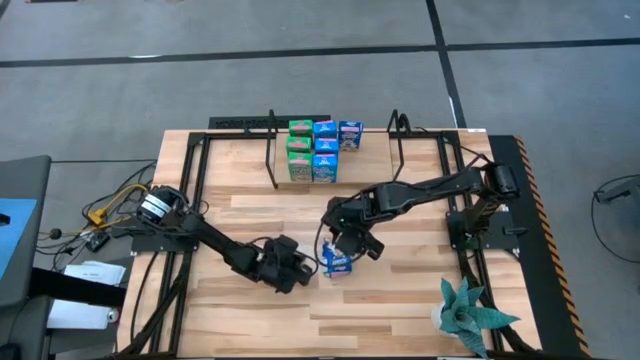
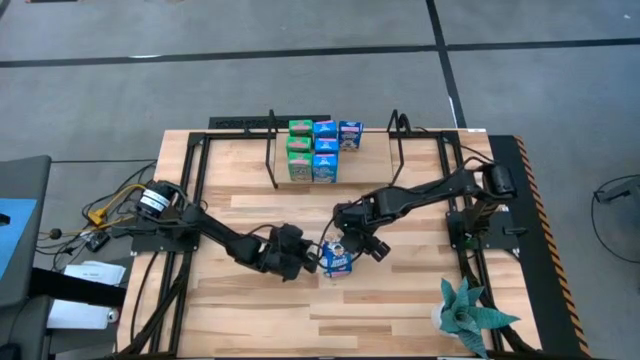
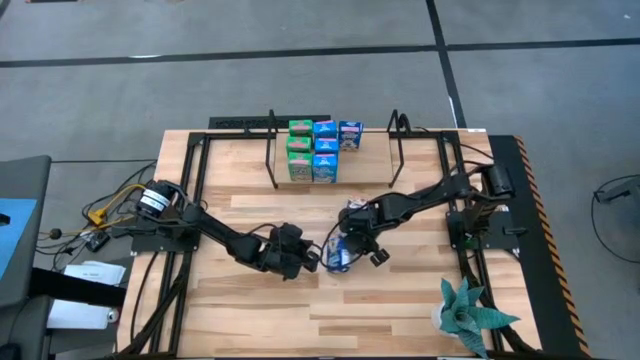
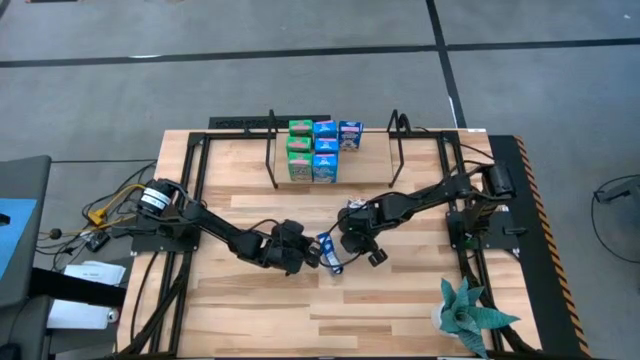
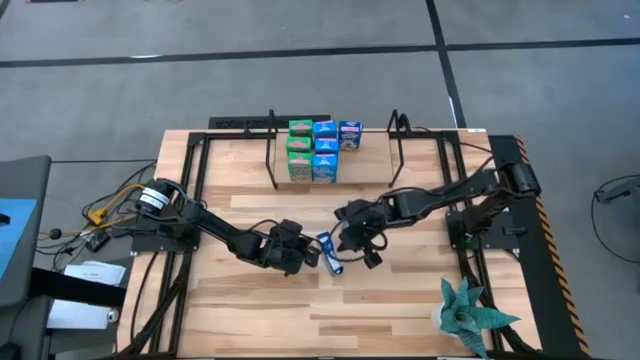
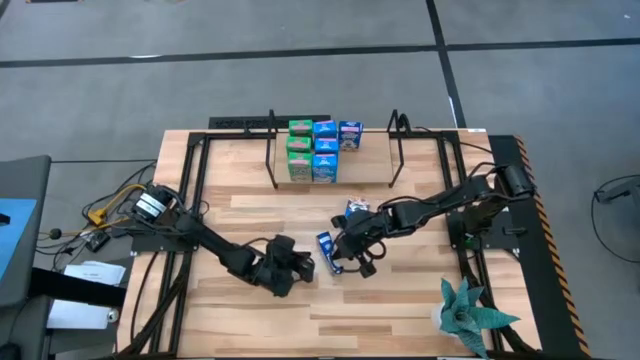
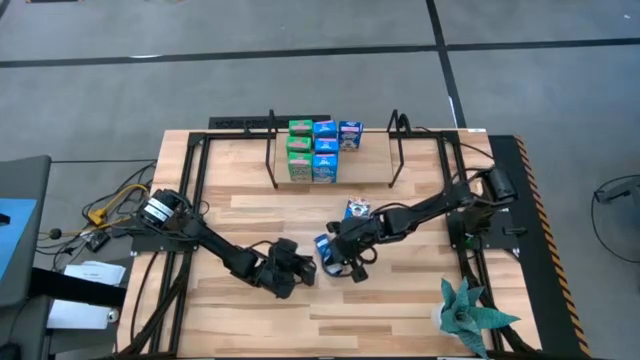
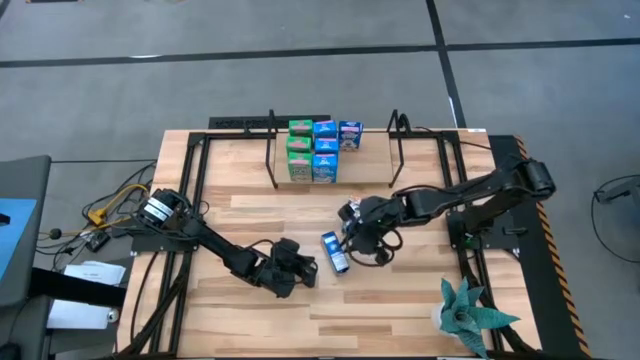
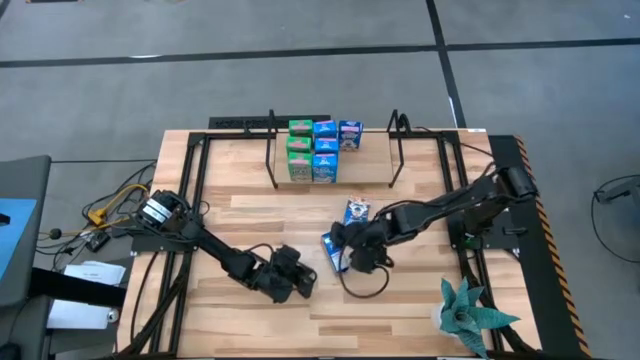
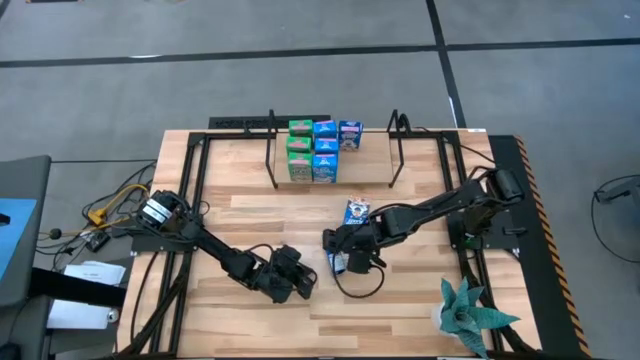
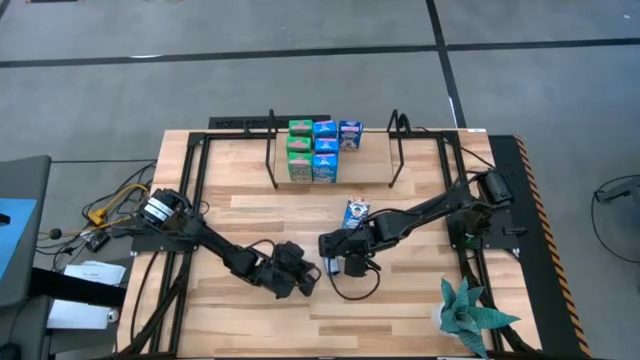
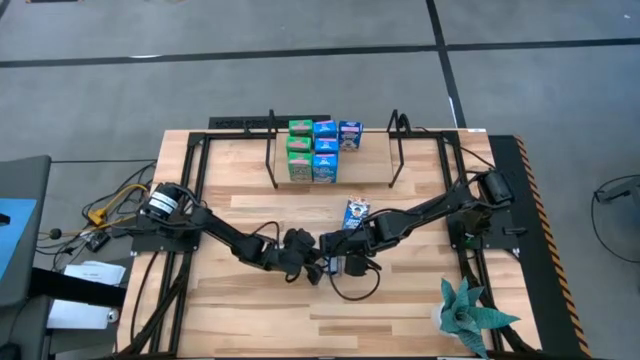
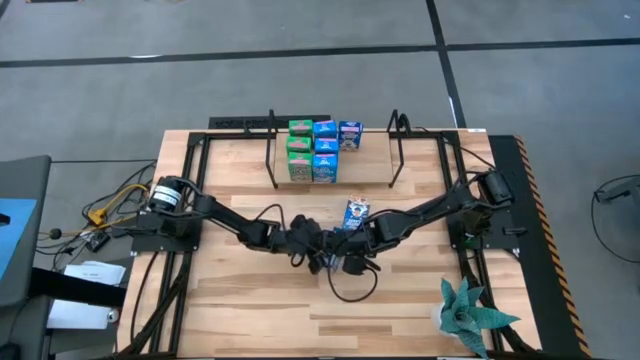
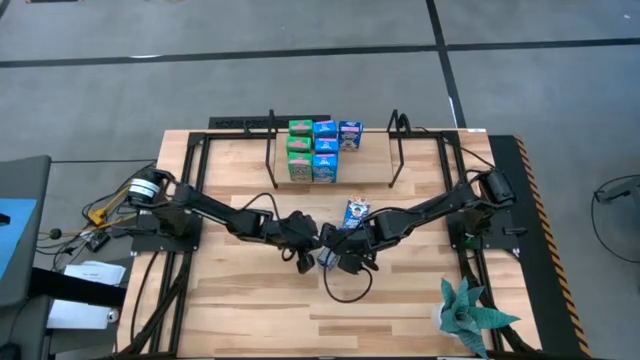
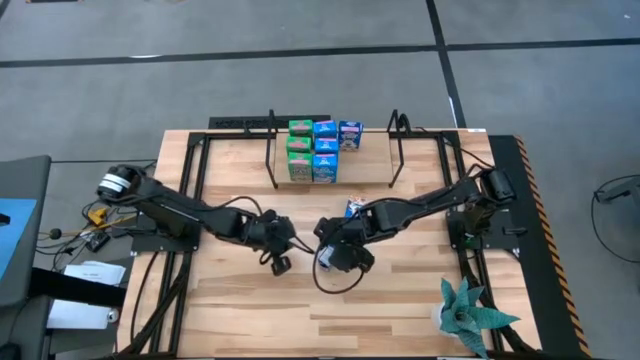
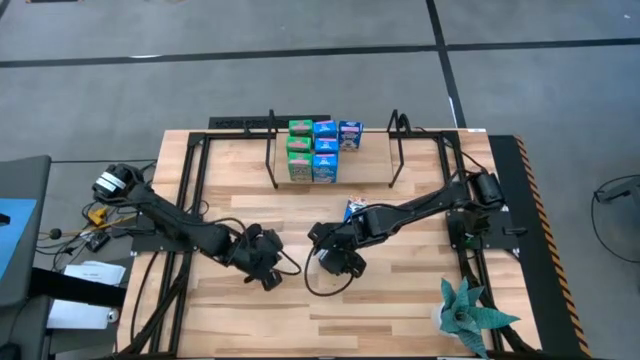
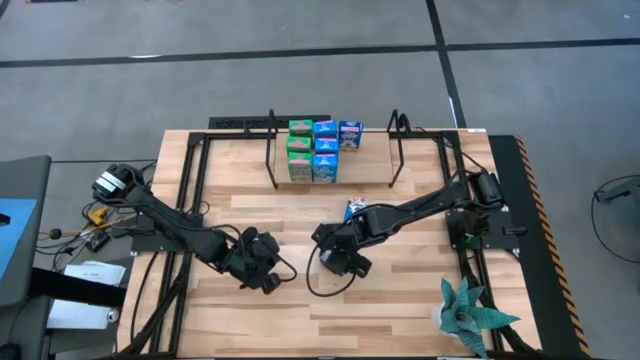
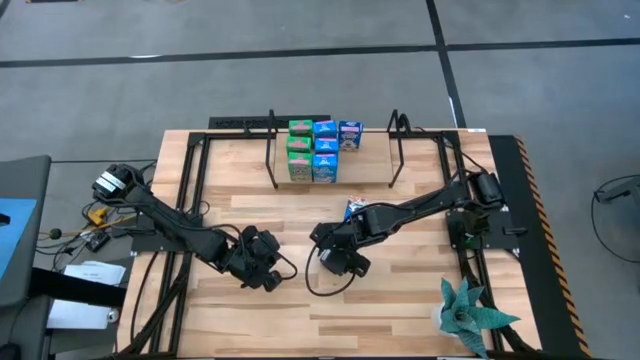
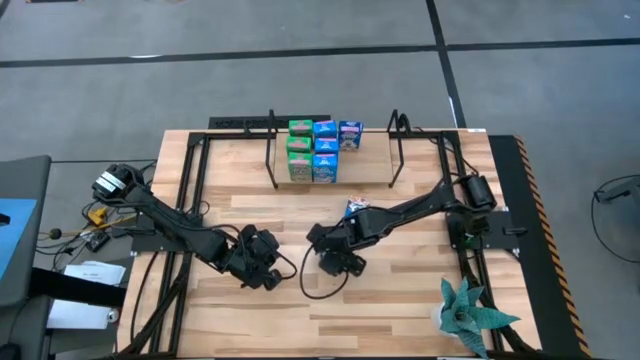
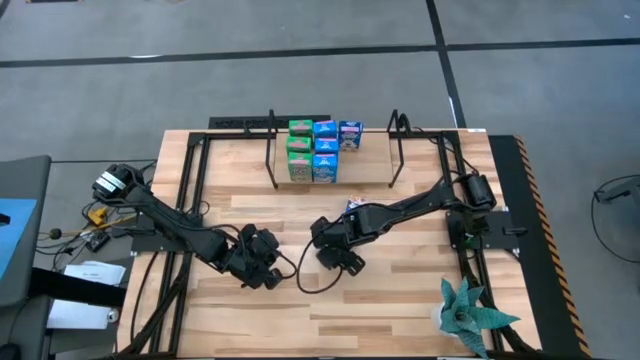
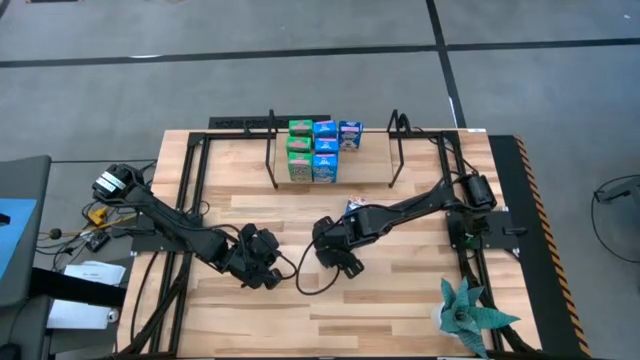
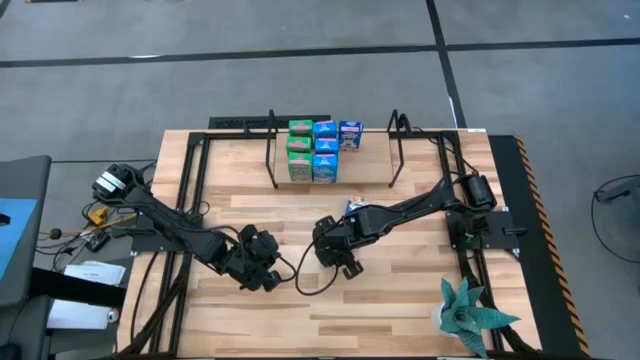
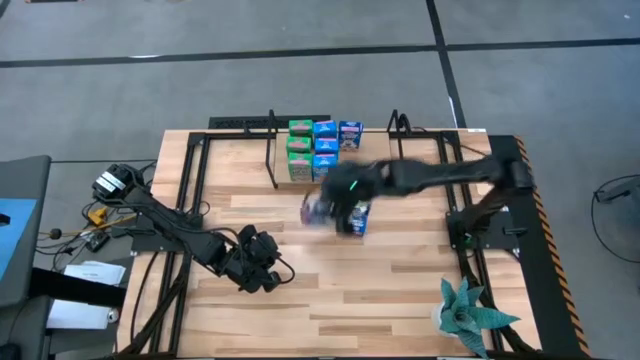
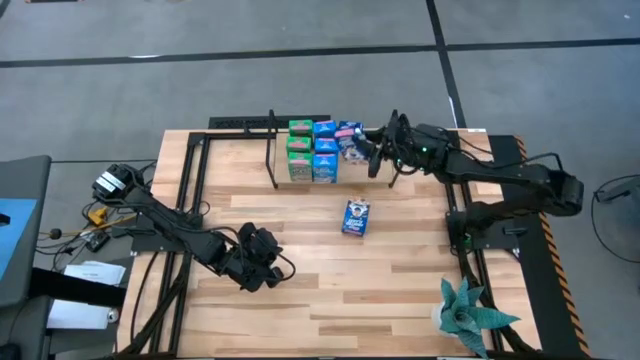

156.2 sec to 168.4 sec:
Task: Stack cereal on shelf
Put the left blue cereal box on the shelf aligned with the other blue cereal box

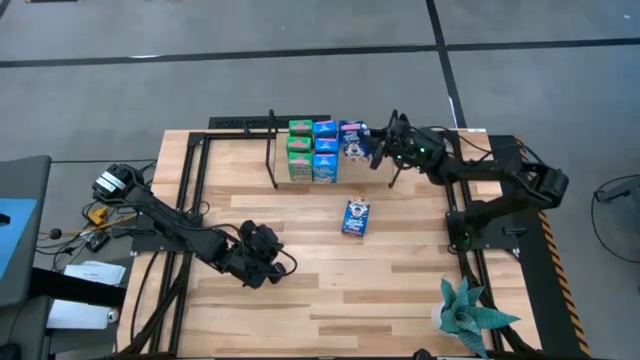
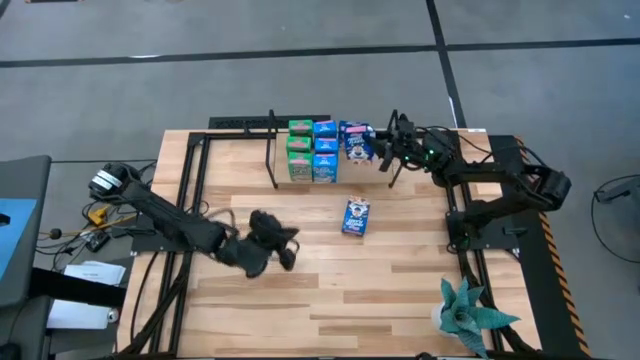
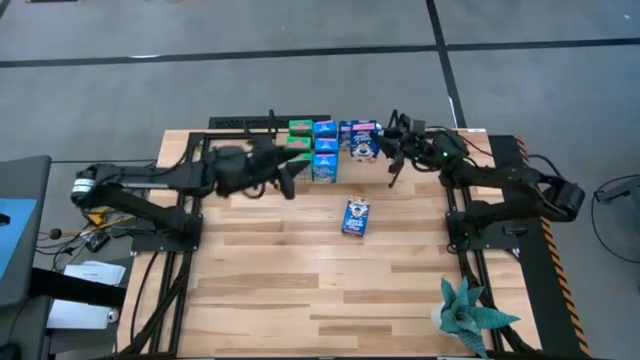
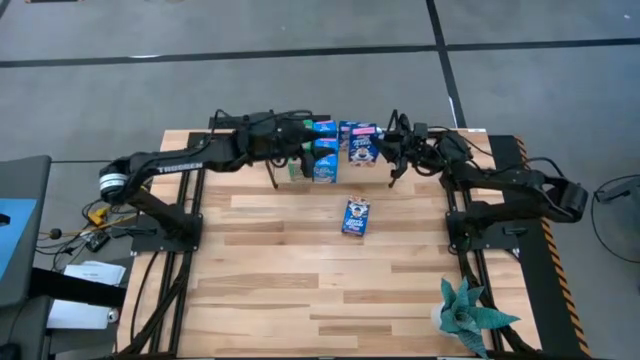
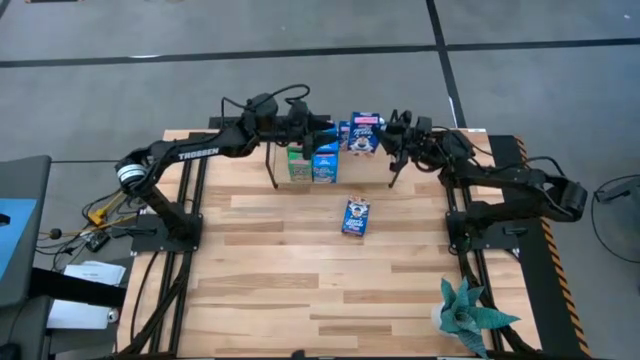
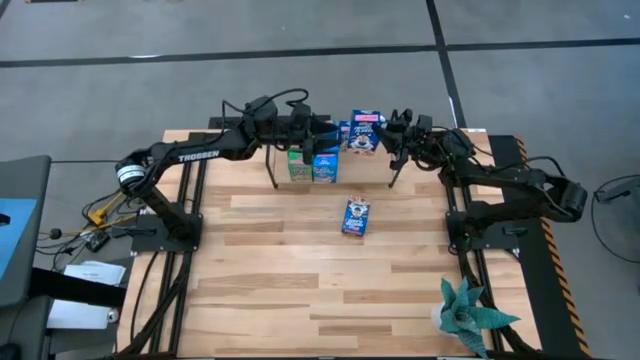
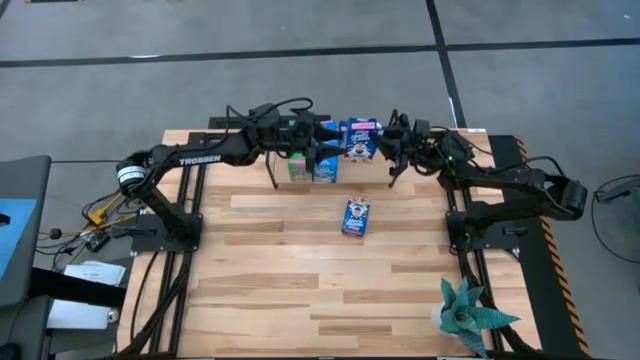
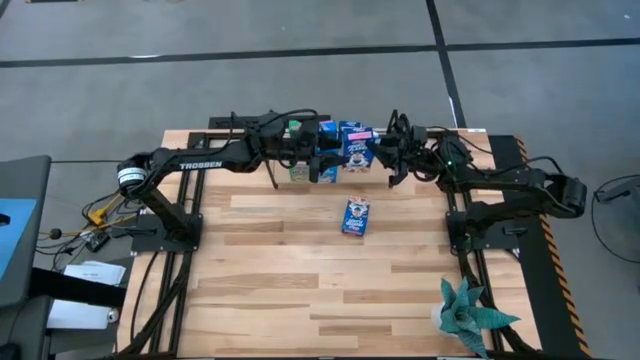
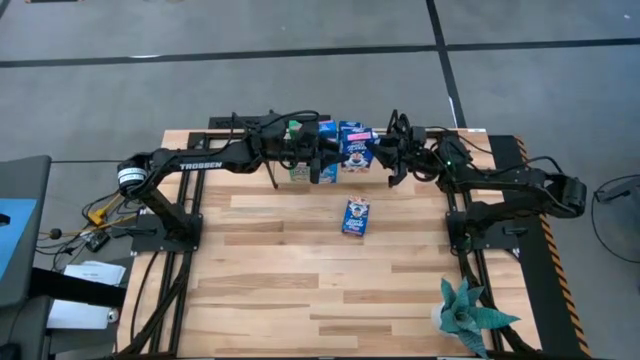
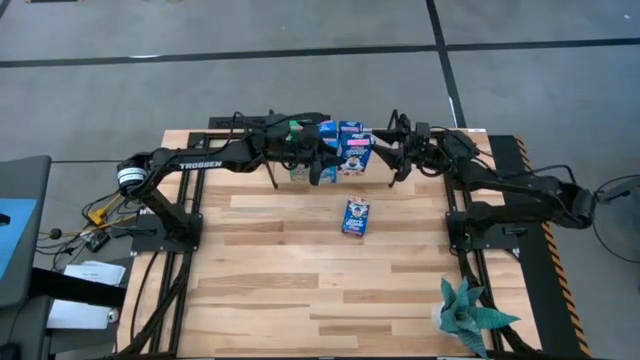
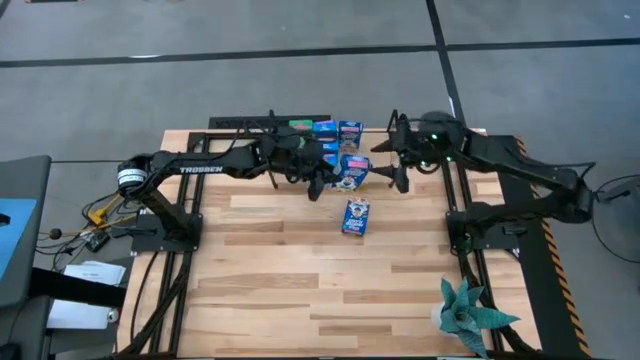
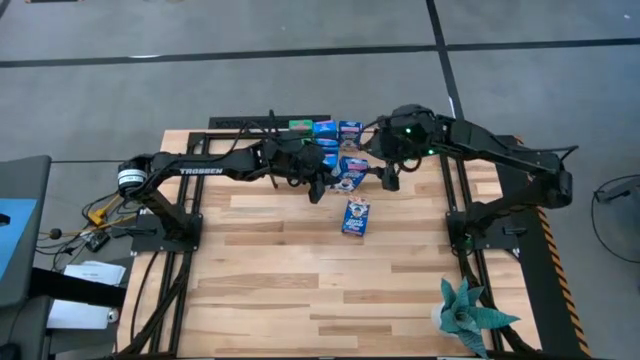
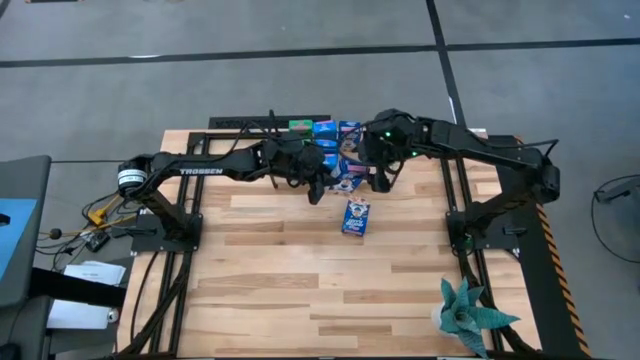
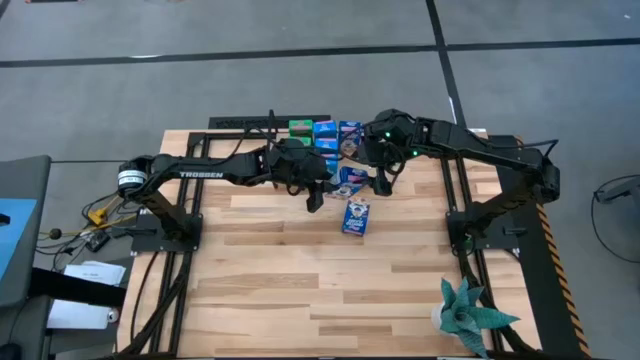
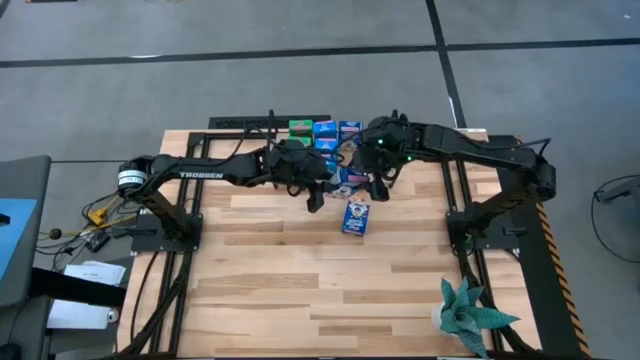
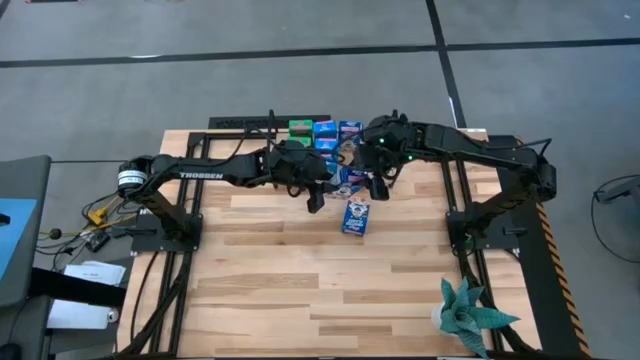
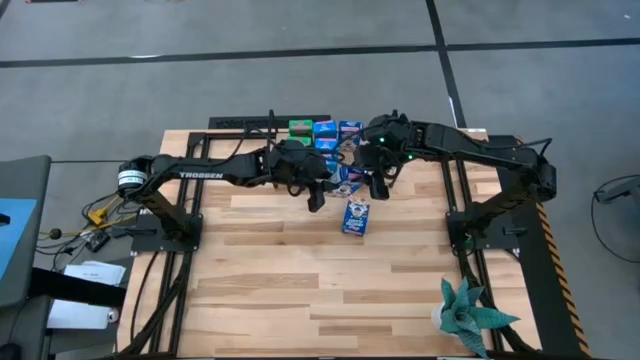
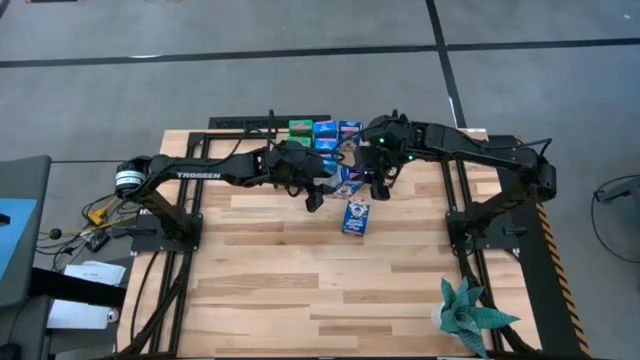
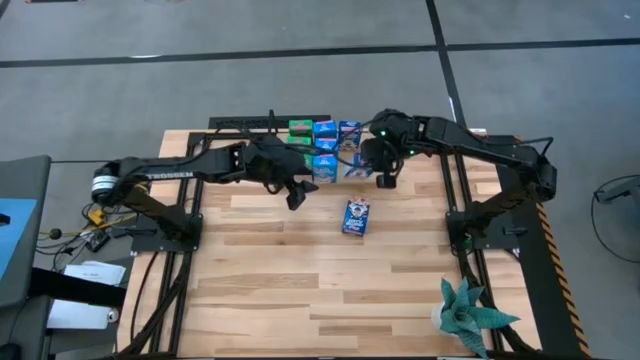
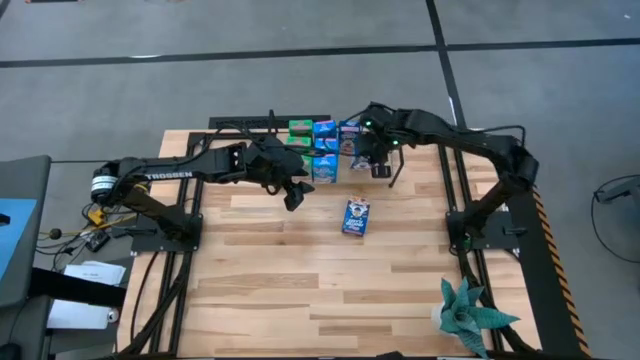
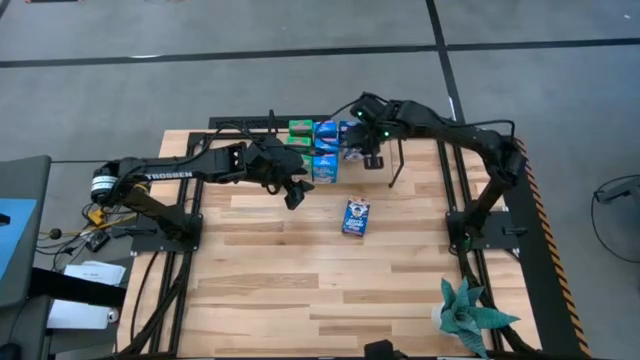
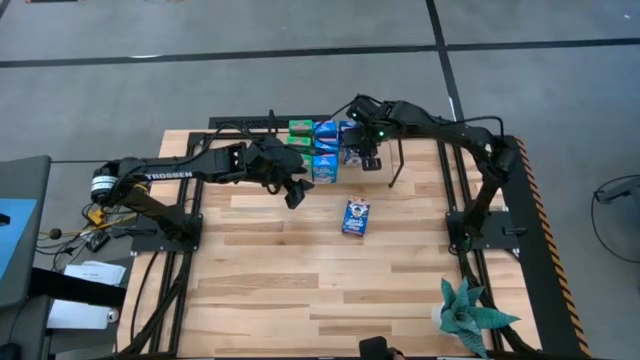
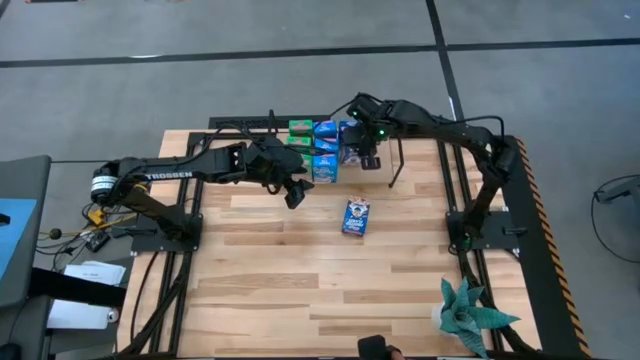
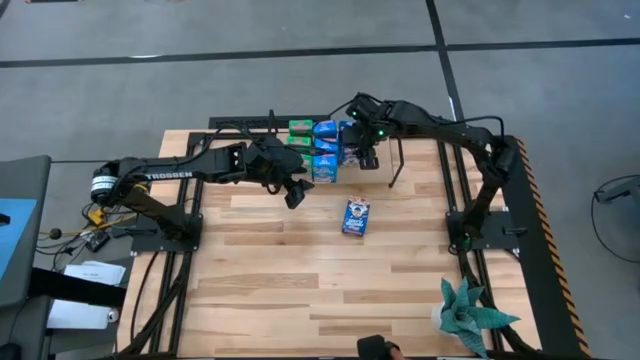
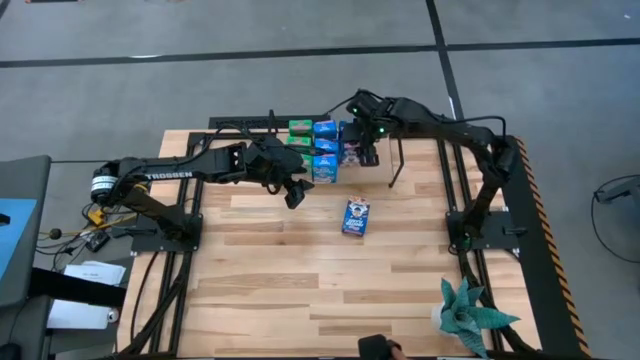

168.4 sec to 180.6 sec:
Put the left blue cereal box on the shelf aligned with the other blue cereal box
